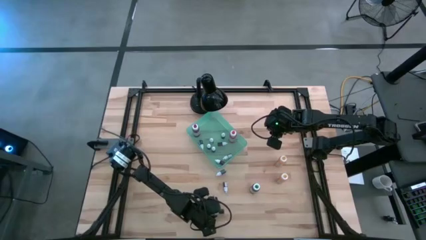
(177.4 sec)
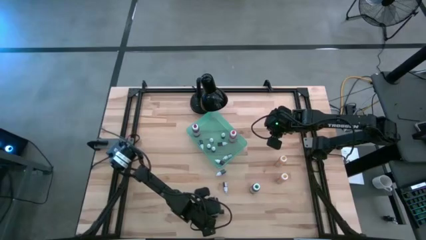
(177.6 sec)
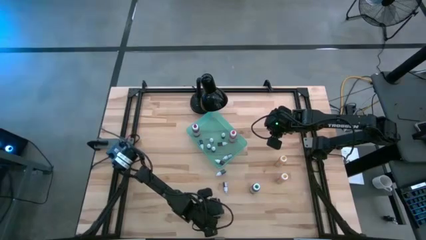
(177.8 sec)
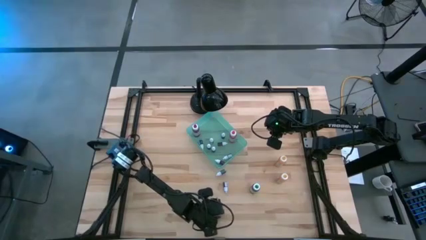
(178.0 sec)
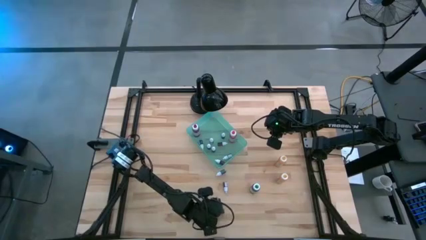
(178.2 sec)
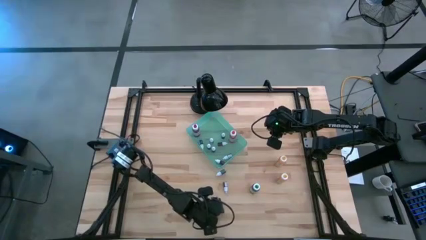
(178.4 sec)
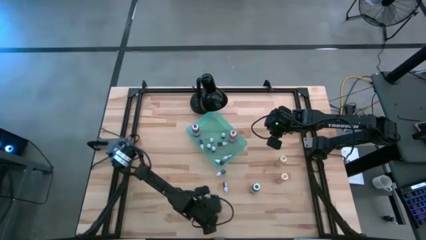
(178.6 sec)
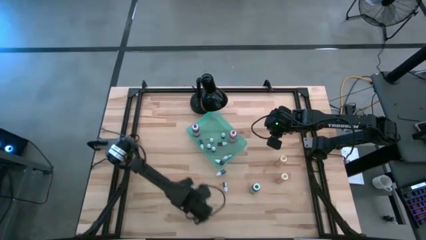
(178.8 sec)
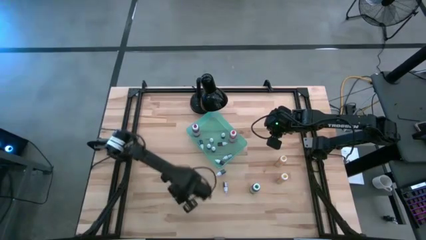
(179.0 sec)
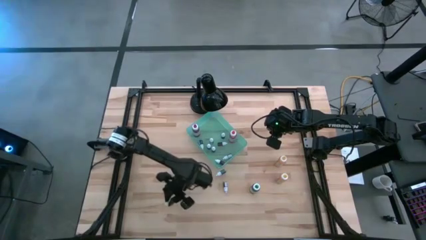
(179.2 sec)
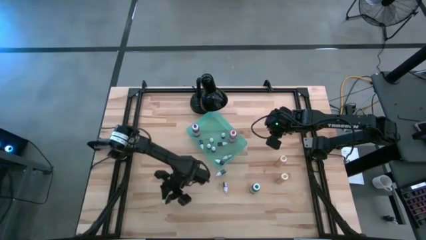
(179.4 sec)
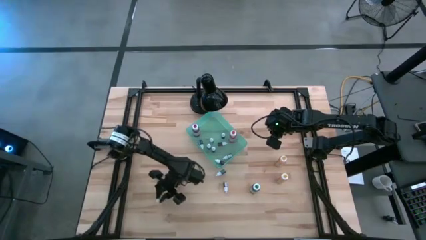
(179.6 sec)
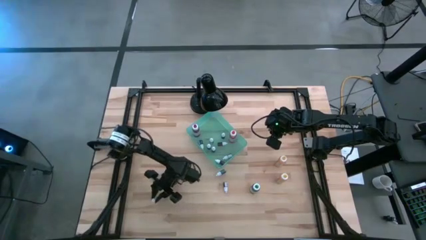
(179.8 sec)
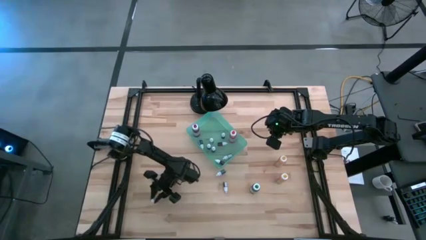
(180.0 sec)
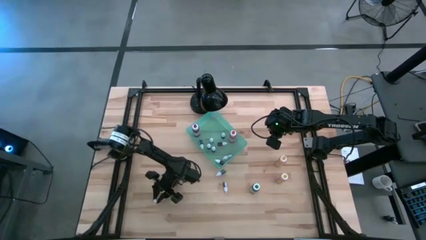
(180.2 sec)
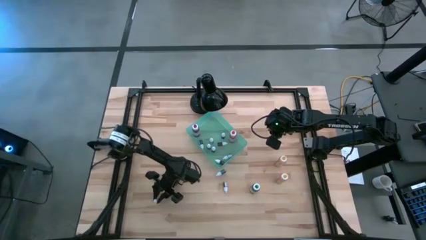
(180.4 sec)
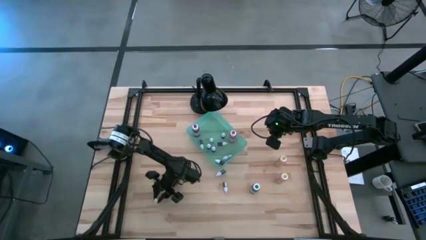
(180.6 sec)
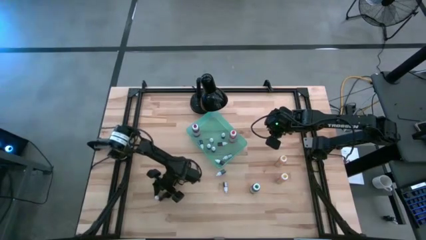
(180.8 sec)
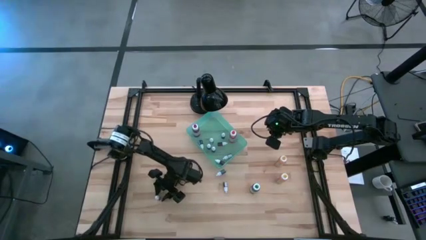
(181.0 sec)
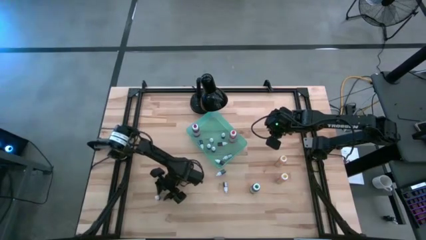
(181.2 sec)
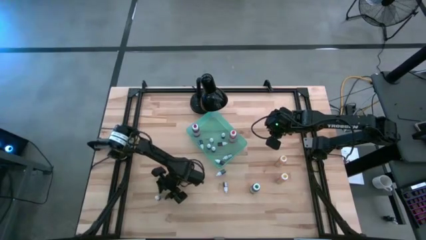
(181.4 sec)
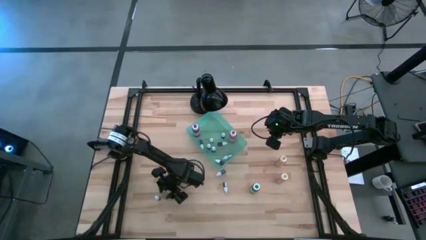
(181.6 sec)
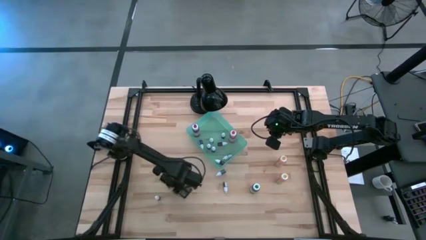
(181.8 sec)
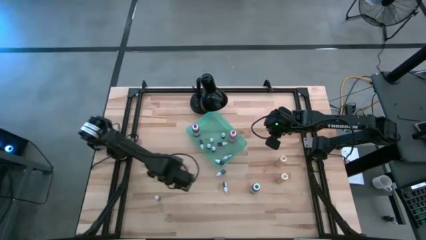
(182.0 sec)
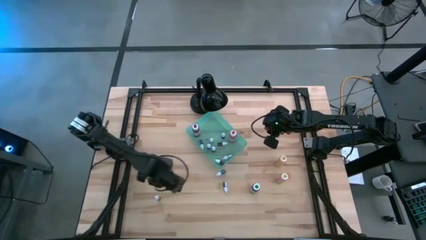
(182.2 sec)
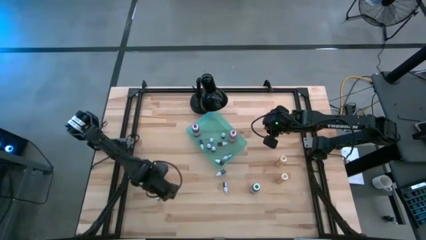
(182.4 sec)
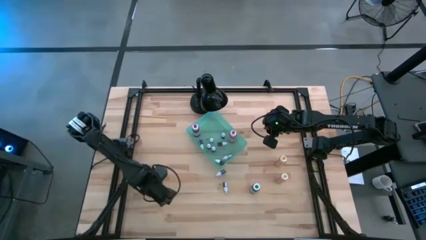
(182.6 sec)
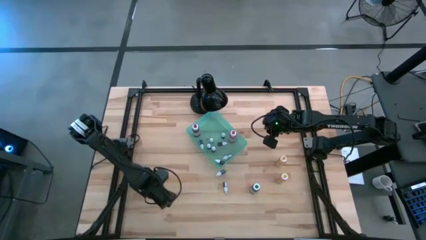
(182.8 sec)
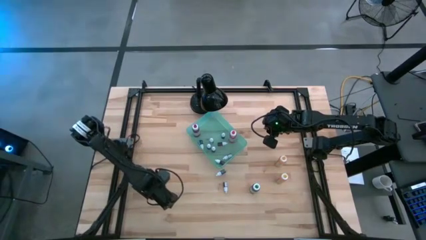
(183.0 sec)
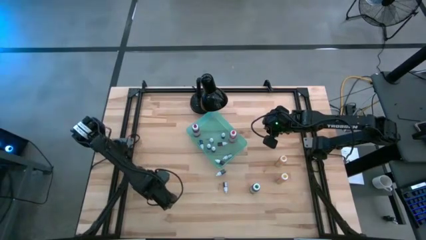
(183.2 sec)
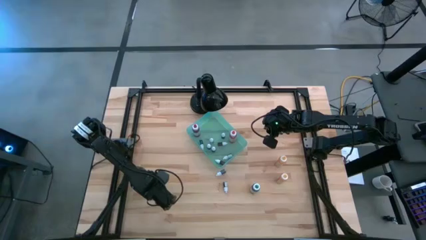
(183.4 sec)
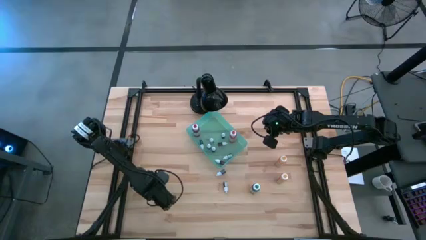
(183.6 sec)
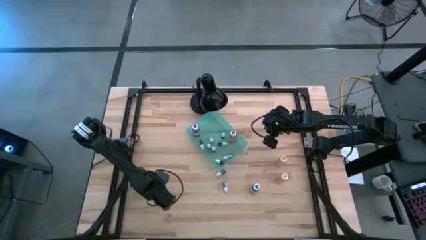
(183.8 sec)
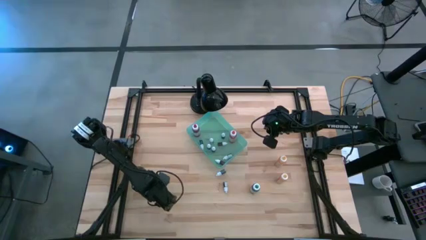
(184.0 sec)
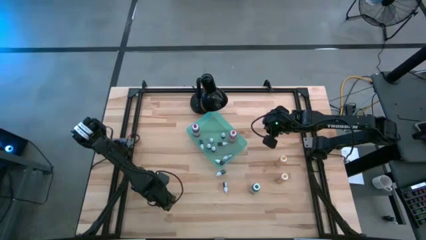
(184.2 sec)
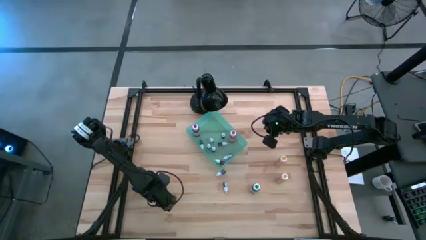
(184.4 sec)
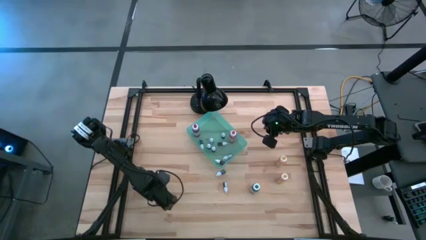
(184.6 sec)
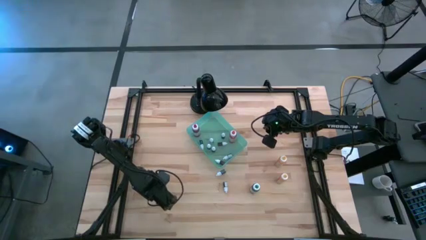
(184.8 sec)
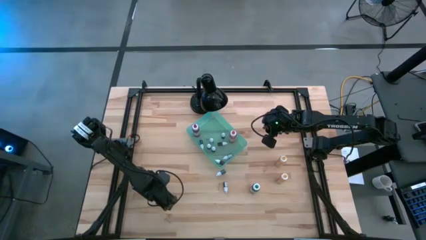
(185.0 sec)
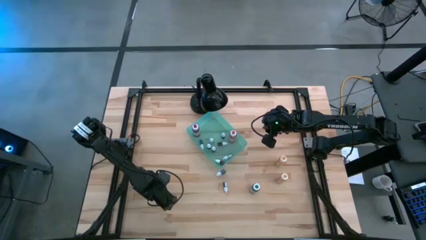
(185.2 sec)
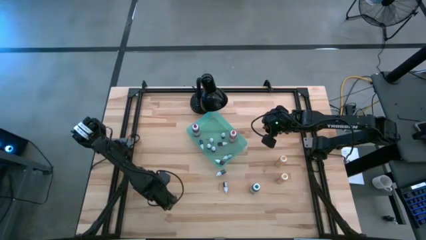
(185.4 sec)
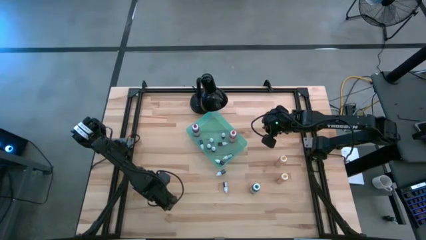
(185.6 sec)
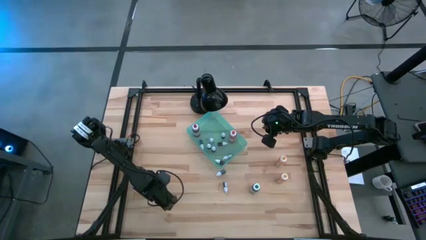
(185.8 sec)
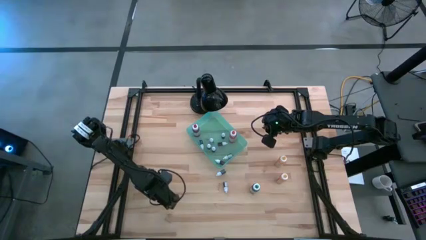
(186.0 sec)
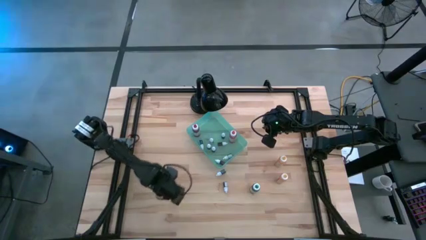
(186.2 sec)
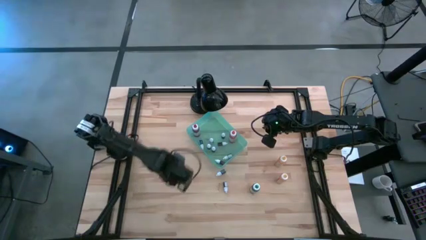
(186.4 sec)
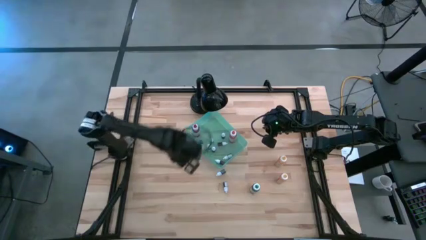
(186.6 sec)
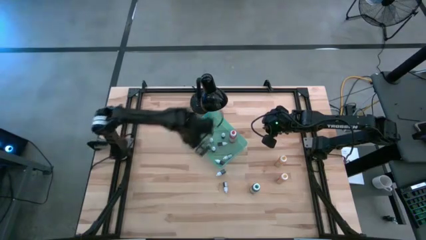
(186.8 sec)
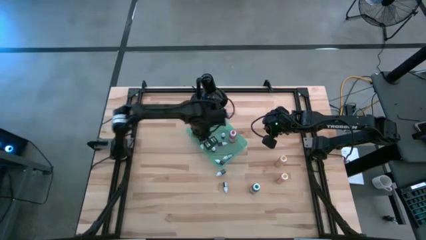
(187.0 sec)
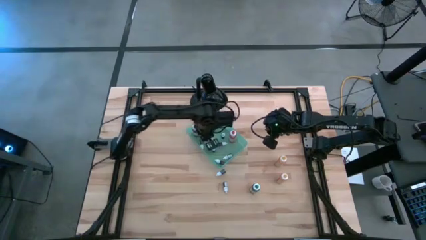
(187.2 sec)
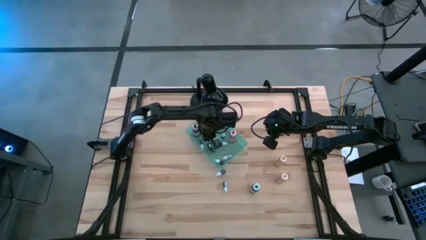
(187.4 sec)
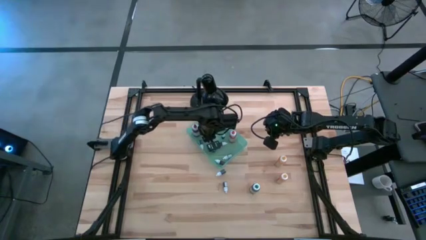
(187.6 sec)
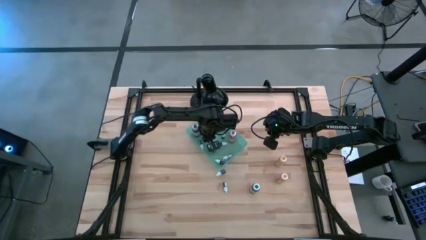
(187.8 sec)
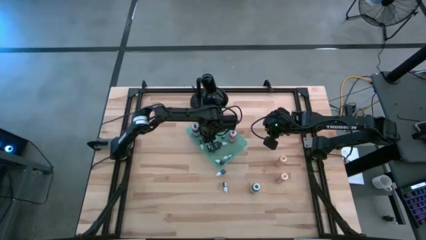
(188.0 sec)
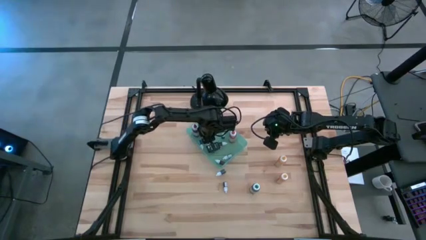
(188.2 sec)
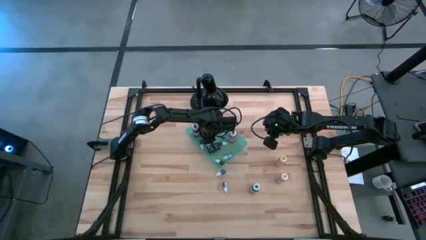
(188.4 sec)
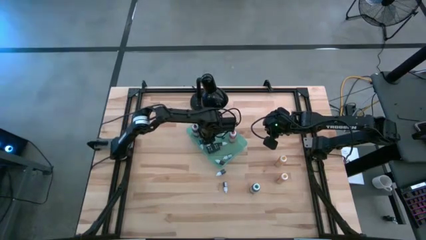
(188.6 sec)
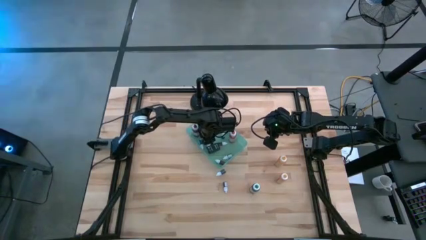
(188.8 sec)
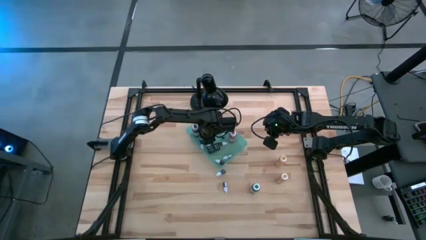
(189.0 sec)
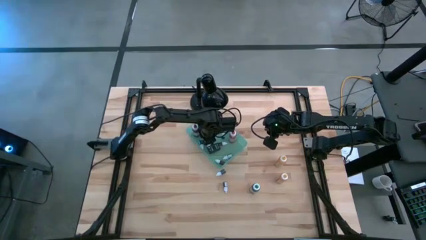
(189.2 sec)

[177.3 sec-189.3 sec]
Task: Pick & Place food coloring
Put the small black food coloring bottle into the green bin

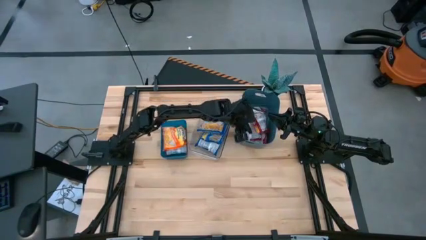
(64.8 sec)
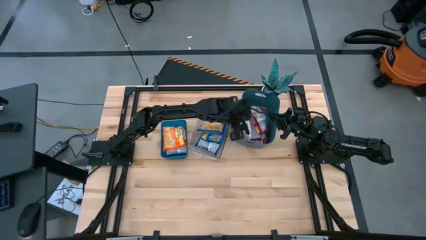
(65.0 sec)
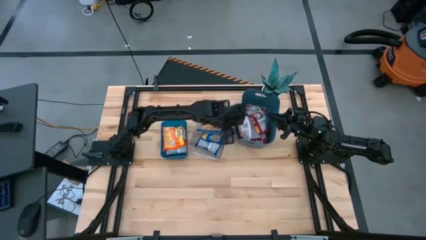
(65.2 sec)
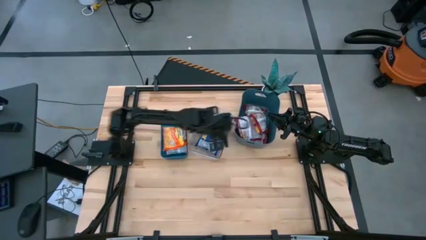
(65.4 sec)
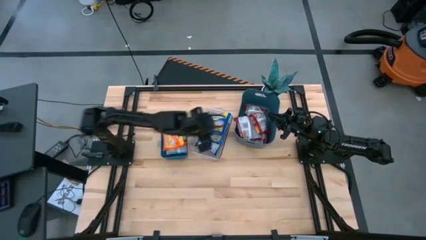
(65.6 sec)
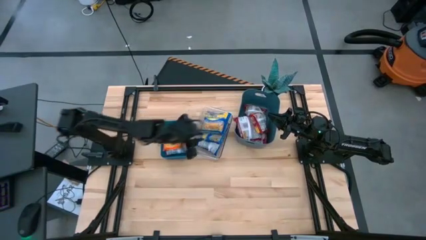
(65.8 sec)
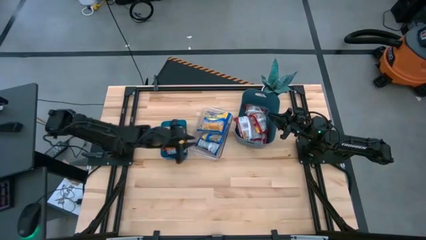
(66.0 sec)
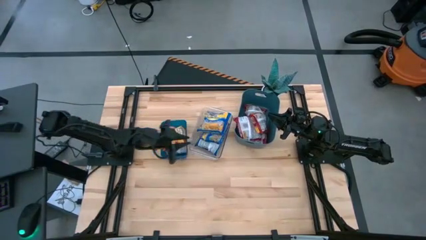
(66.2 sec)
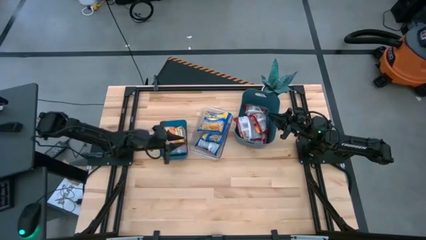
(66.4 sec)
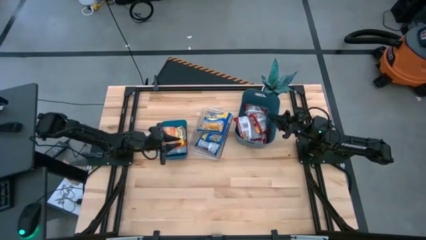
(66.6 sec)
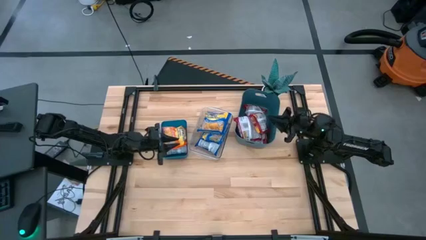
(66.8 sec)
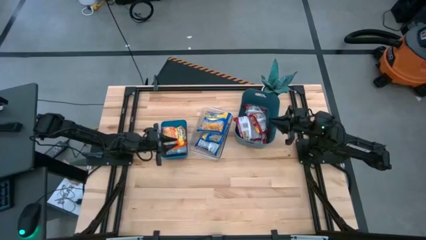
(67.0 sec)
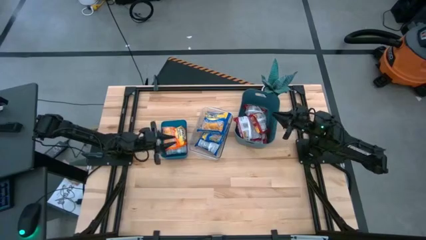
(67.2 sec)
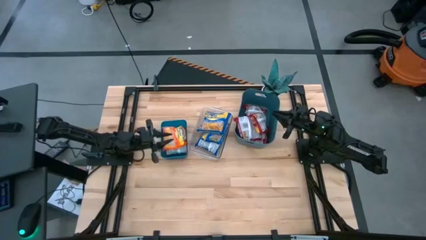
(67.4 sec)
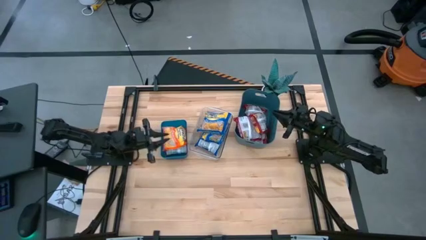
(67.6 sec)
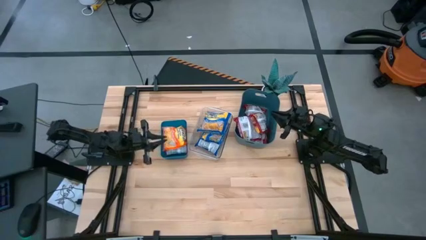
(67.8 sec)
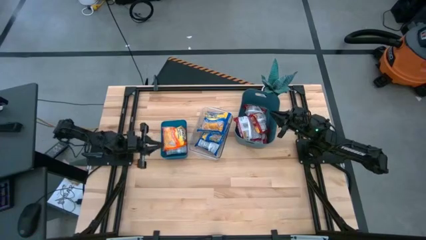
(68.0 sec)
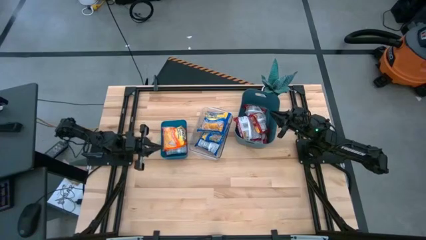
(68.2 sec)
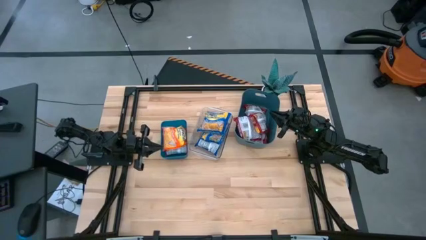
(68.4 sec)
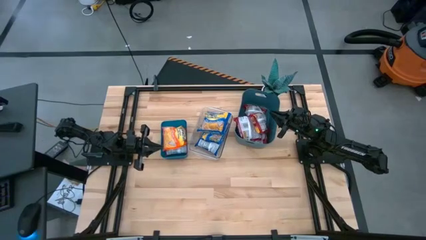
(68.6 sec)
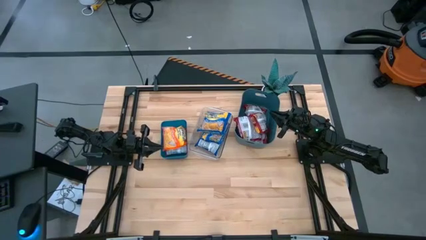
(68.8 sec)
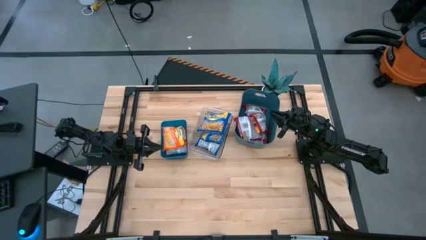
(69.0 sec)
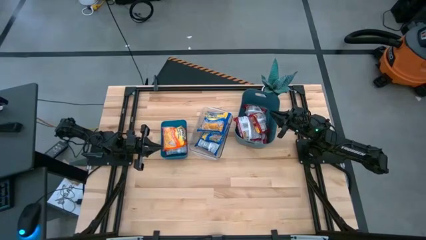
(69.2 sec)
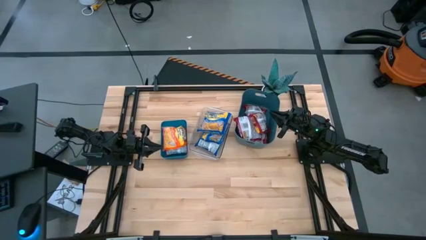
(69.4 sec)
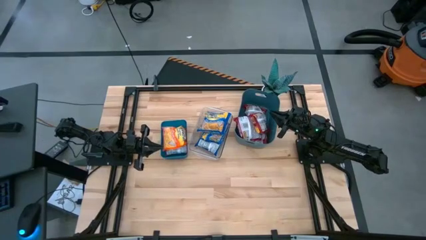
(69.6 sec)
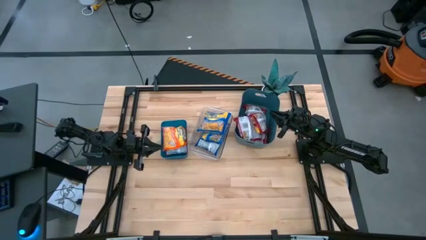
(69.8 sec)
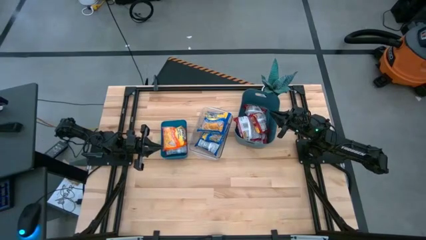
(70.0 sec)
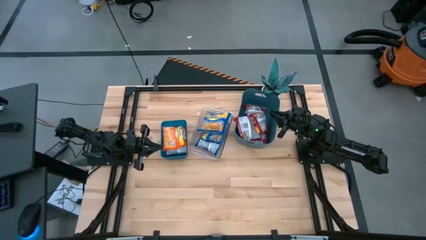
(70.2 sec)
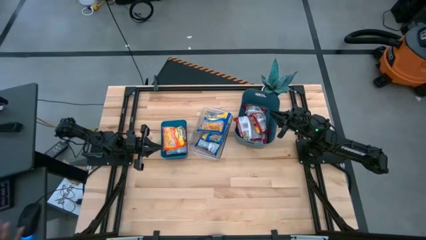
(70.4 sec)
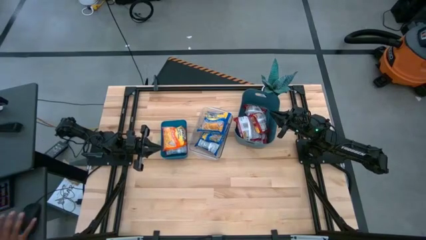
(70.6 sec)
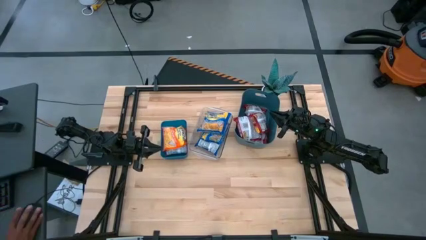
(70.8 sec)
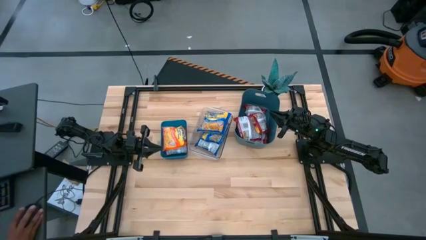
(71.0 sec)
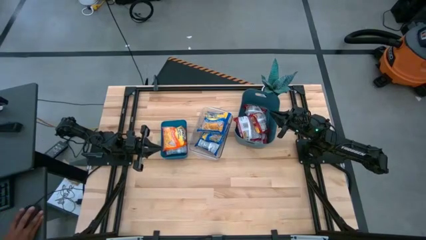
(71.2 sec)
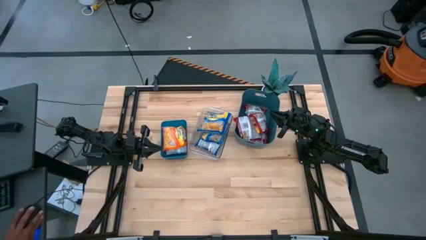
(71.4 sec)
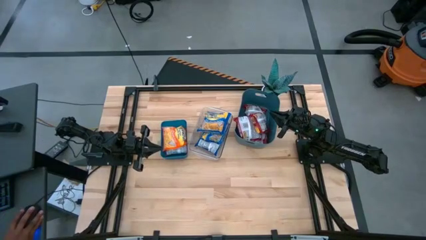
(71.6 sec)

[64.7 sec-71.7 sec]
Task: Sort Maruchan noodles
Return to Home Position
